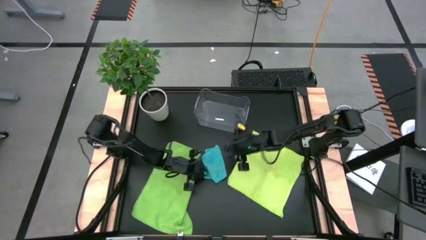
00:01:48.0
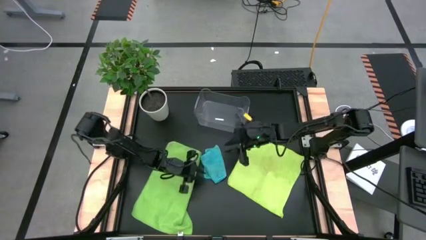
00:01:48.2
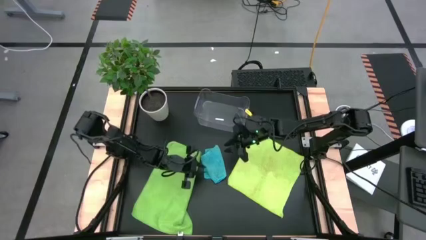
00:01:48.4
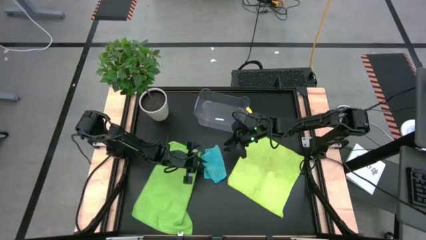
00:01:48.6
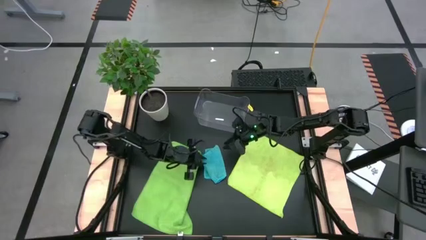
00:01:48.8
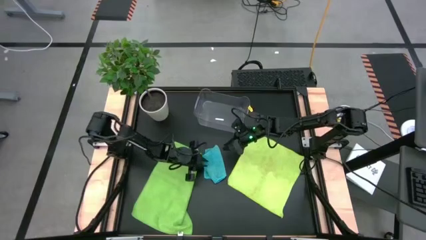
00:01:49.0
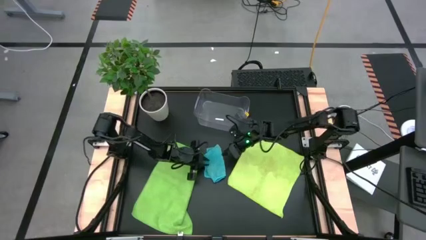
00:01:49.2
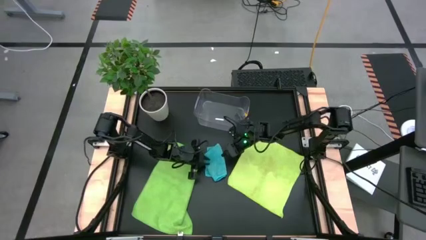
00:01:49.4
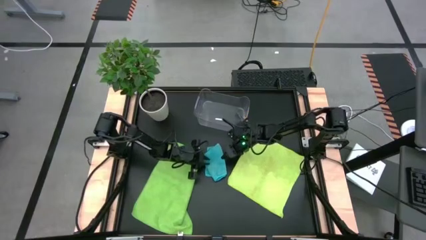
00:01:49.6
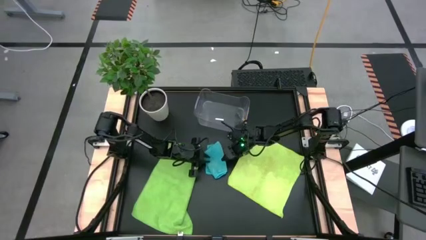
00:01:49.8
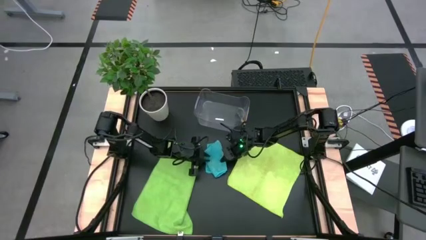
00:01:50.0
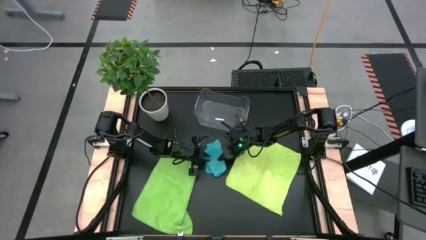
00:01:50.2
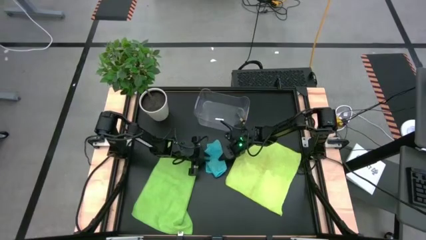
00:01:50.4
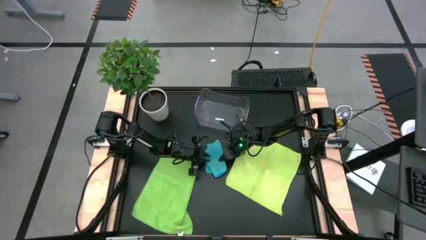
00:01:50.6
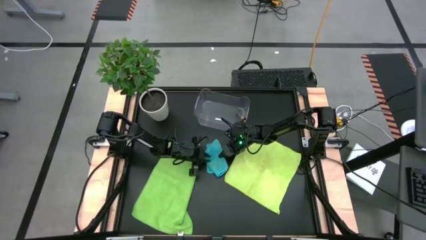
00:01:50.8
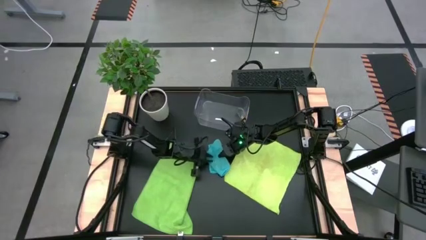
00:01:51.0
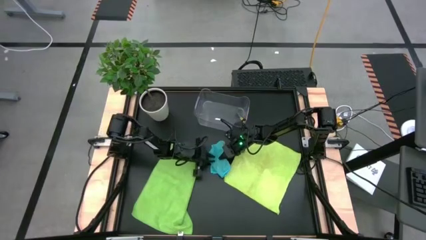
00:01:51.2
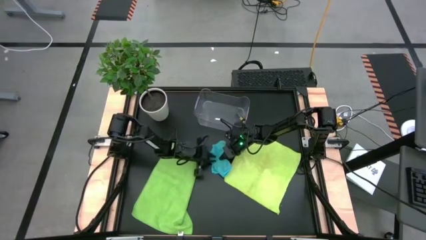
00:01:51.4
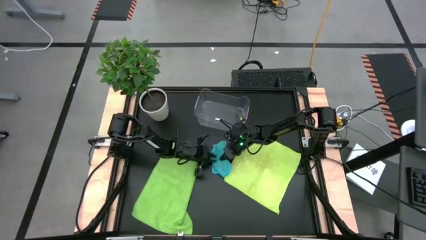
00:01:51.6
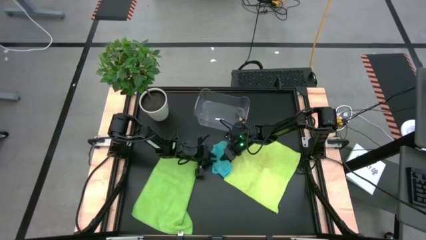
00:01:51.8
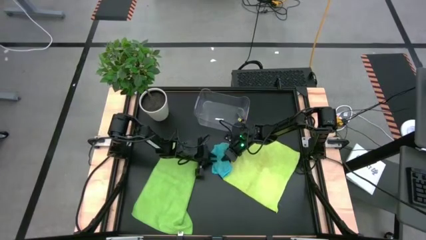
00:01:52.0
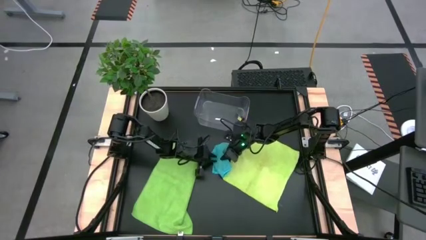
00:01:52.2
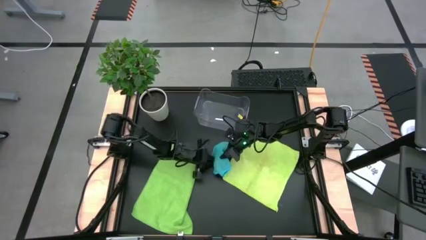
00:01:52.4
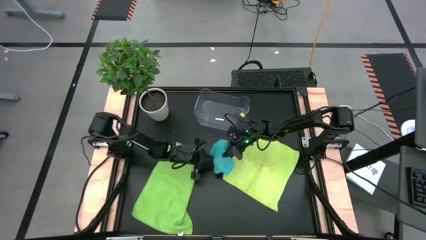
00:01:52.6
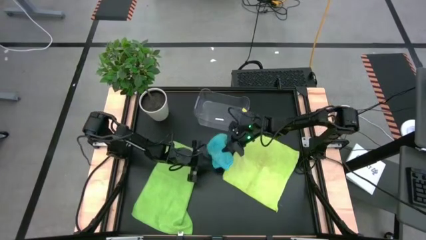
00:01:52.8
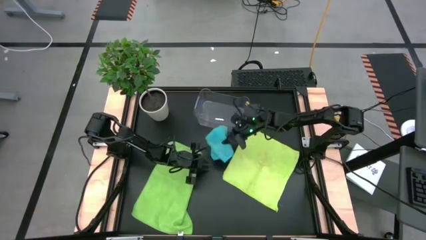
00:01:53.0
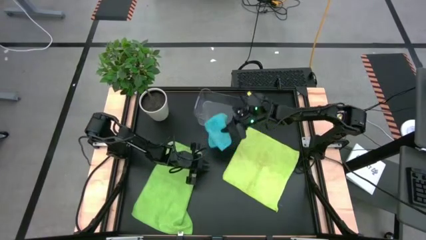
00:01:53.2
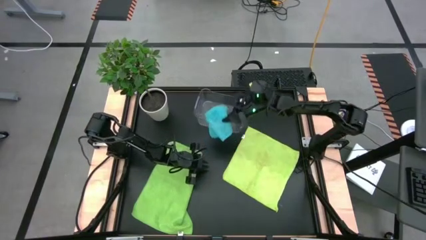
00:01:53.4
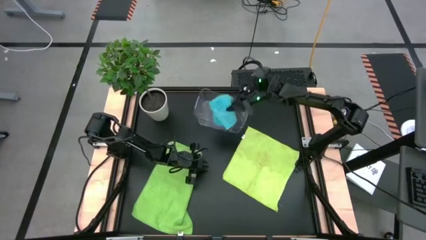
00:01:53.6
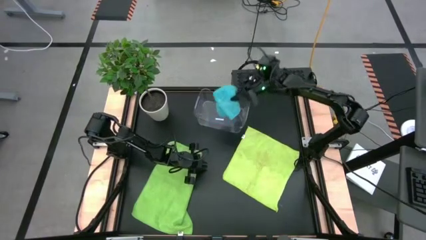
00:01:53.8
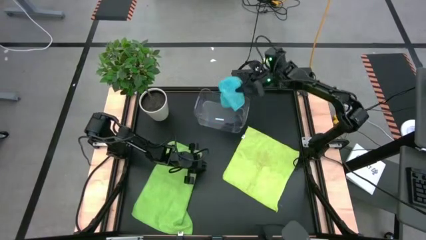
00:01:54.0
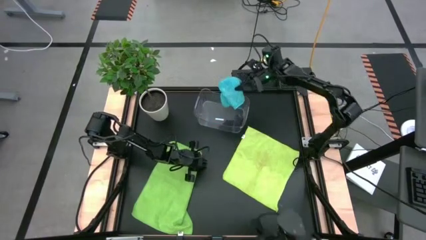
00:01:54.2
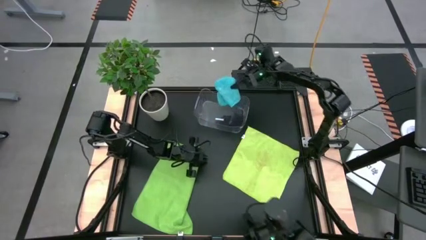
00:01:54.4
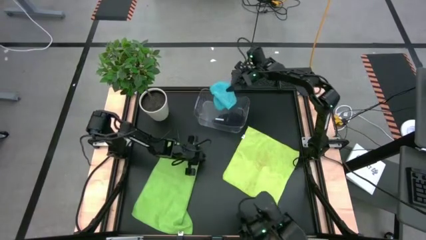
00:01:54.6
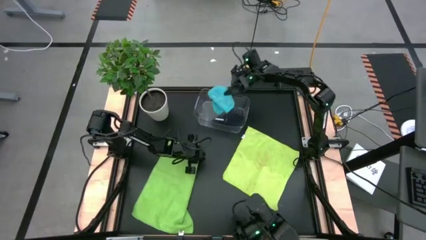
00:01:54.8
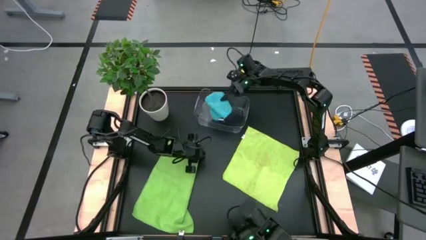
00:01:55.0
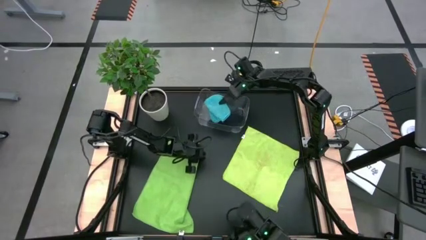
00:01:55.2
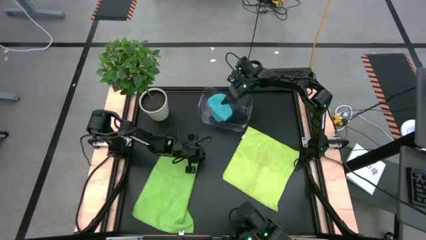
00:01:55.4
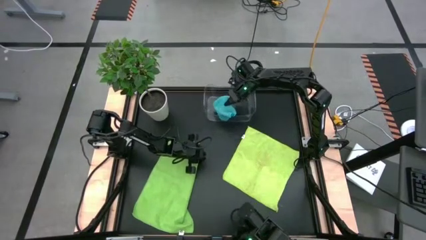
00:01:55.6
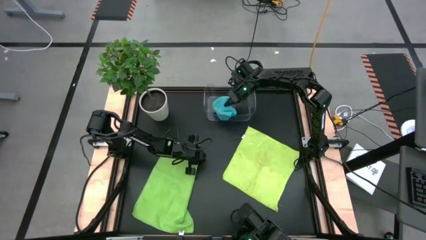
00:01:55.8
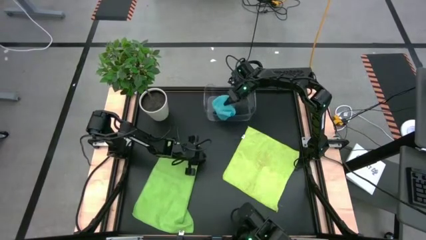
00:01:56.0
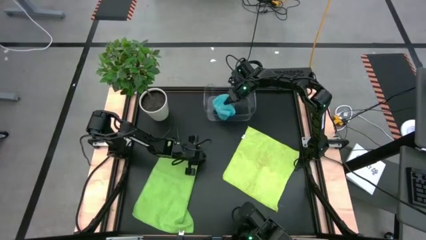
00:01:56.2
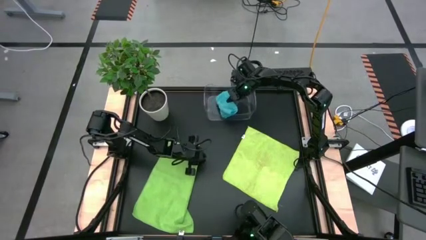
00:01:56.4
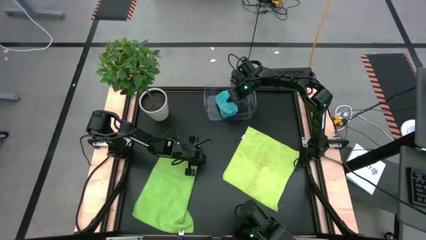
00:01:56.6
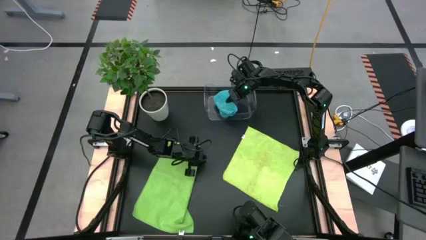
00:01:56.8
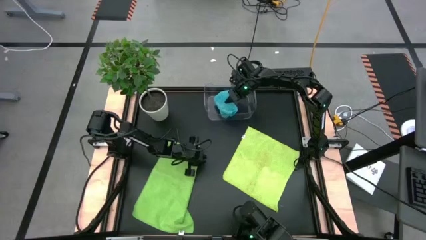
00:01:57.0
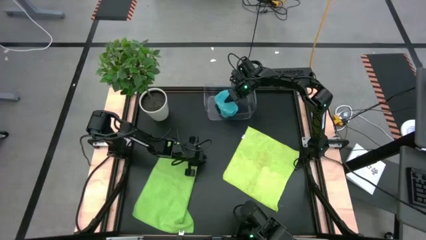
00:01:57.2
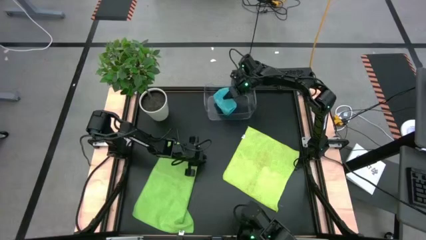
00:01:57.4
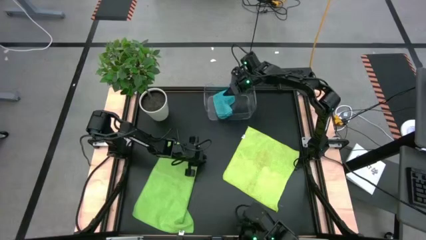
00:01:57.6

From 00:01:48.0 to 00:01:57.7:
Task: Fold microfiber towels
Put the folded blue microfiber cloth into the transparent bin

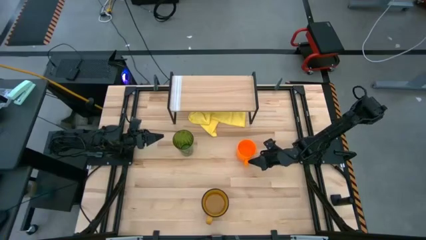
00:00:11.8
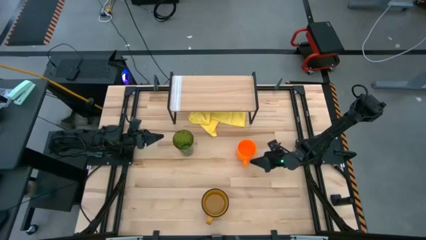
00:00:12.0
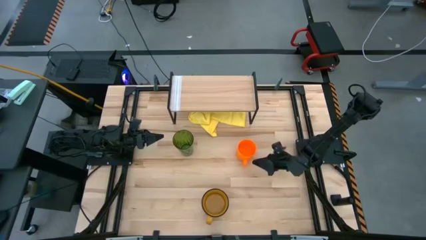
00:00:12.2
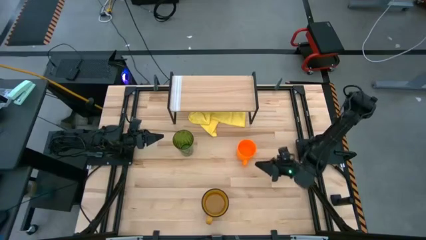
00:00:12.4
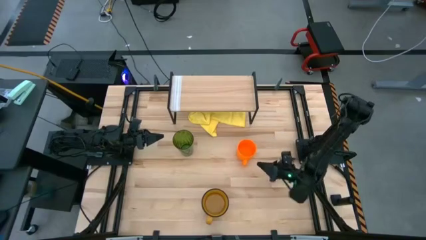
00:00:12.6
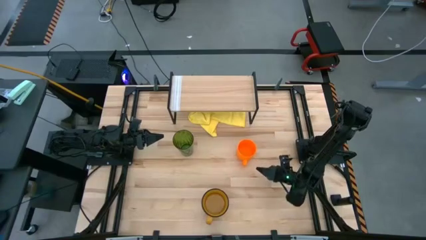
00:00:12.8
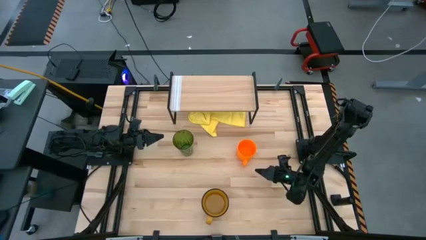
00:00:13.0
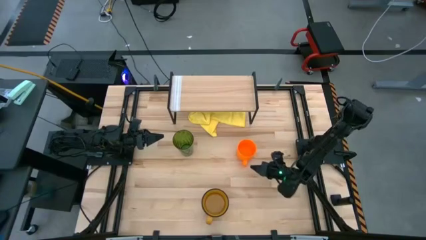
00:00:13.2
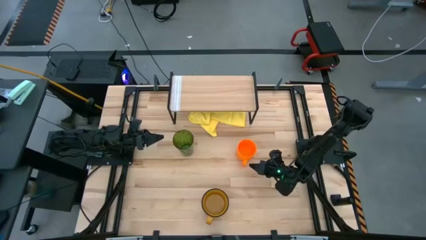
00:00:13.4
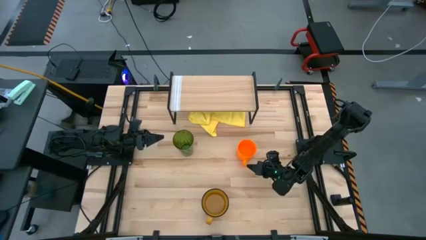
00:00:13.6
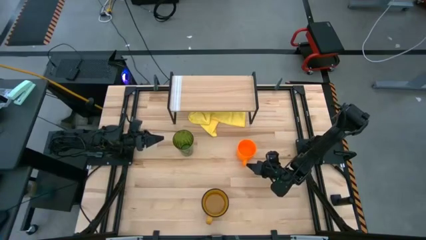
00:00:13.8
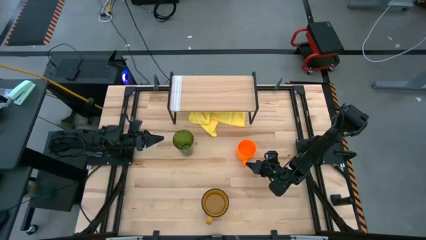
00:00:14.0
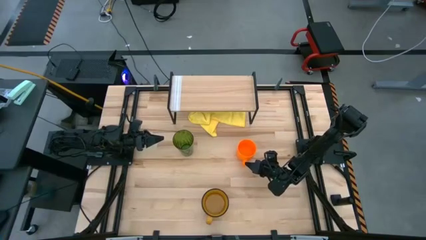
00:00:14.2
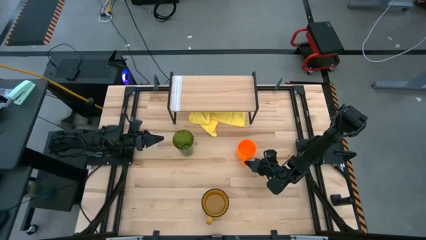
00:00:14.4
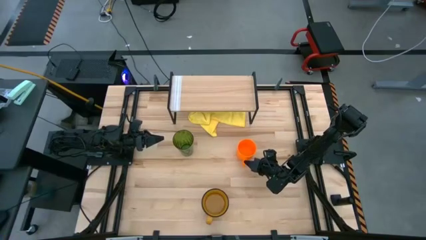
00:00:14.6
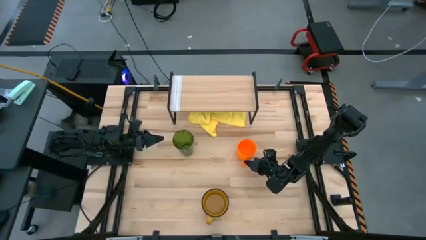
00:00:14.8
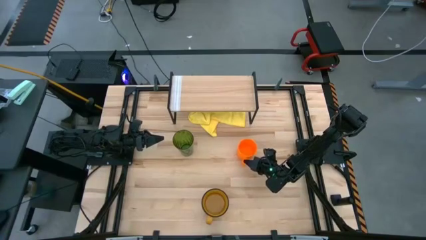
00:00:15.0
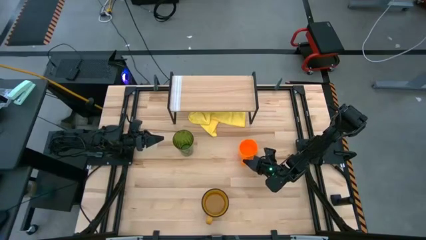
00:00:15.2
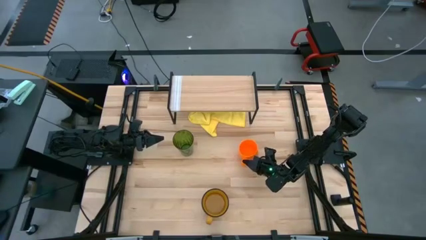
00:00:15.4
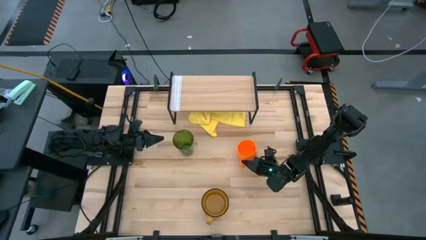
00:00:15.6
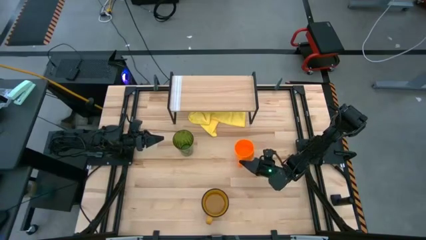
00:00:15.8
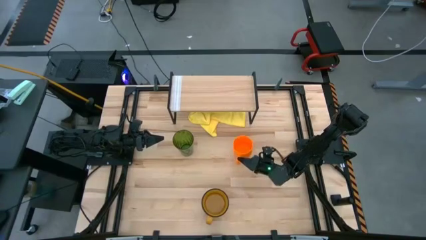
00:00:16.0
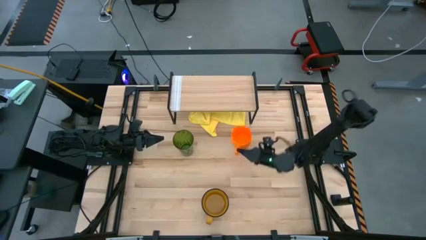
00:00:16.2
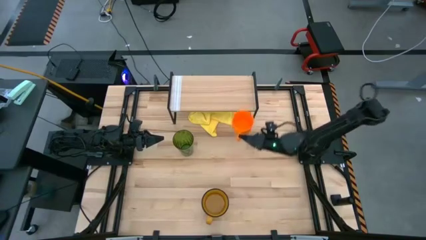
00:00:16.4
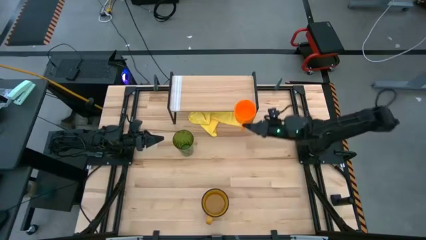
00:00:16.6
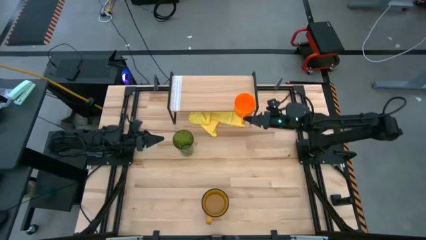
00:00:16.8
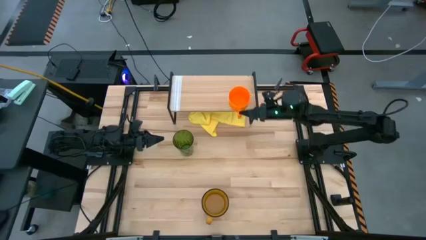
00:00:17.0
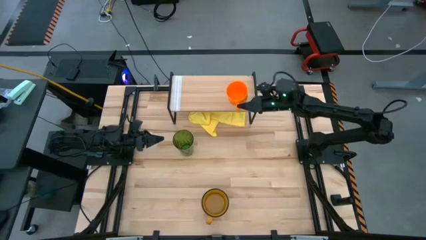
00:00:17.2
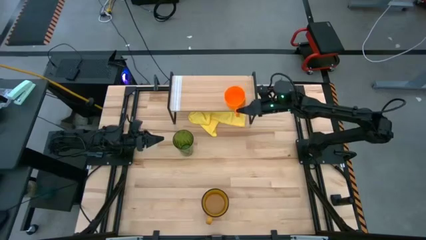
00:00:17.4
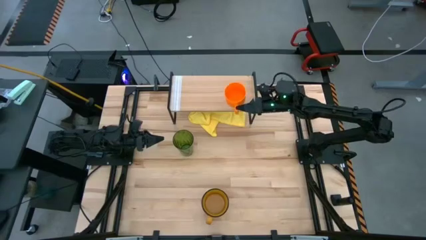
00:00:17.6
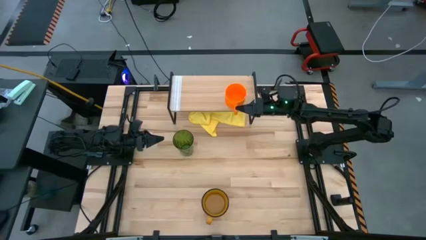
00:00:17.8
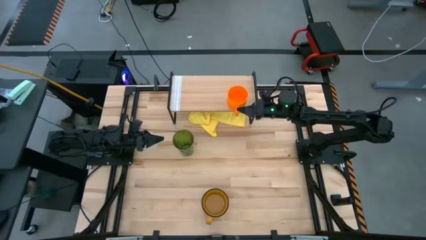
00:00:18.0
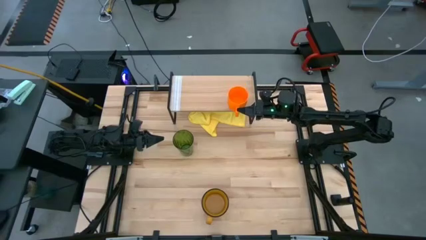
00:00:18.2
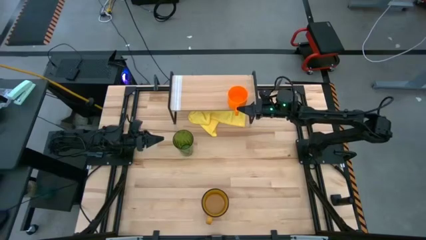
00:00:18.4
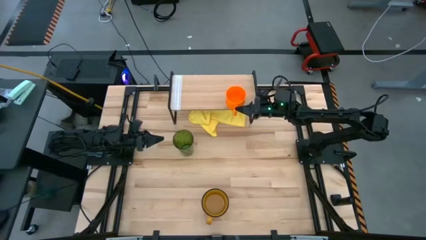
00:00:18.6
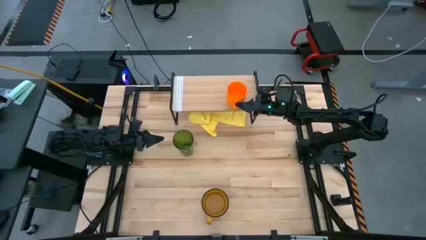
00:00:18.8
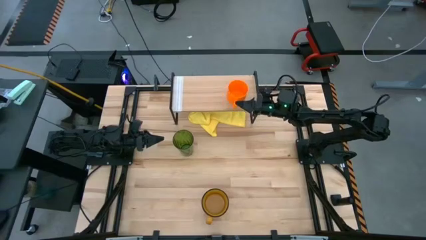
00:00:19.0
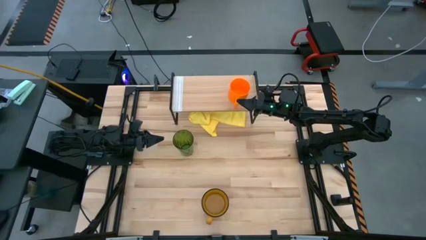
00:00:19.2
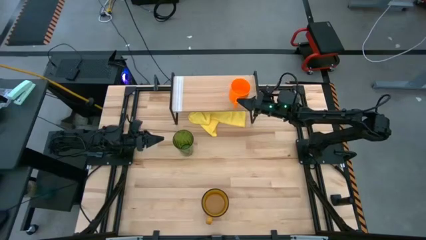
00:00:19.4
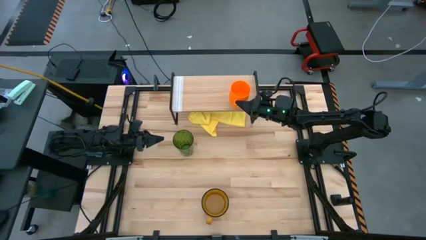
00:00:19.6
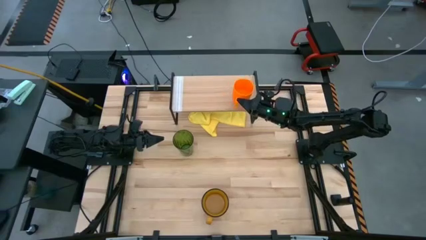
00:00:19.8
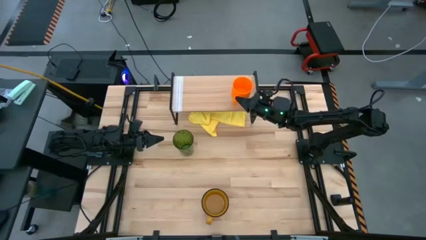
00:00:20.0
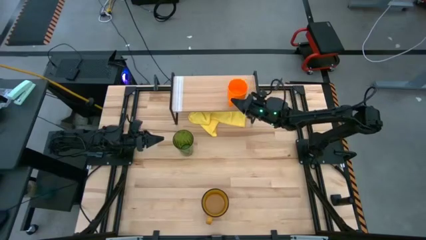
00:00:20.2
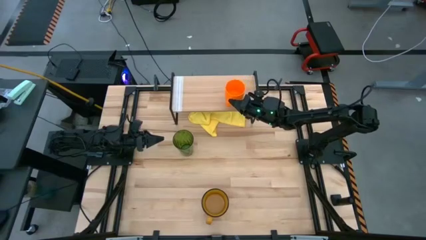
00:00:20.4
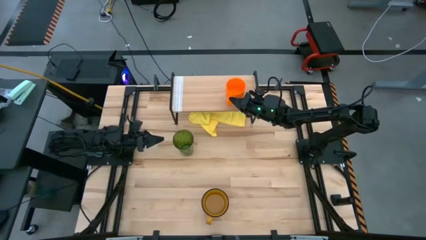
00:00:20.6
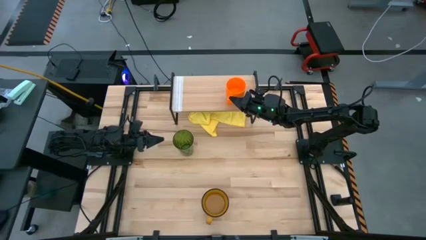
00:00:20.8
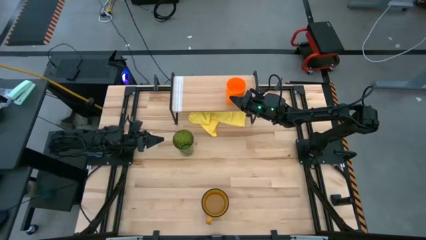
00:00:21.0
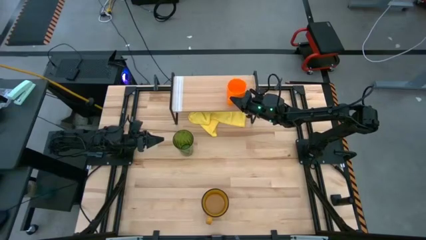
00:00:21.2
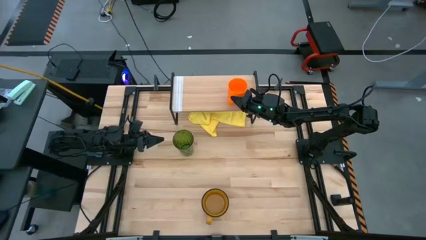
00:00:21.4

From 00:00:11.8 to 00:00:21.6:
Task: Stack small to large cups/mugs on shelf
Put the orange mug on the shelf
